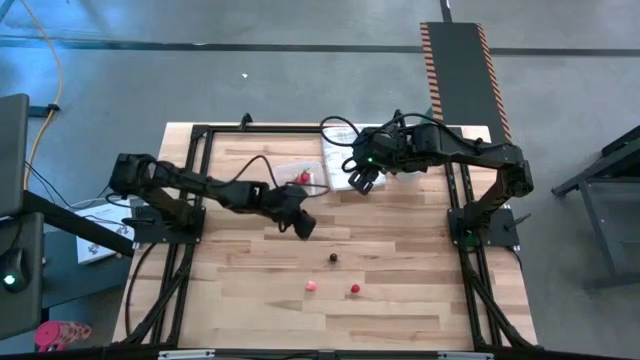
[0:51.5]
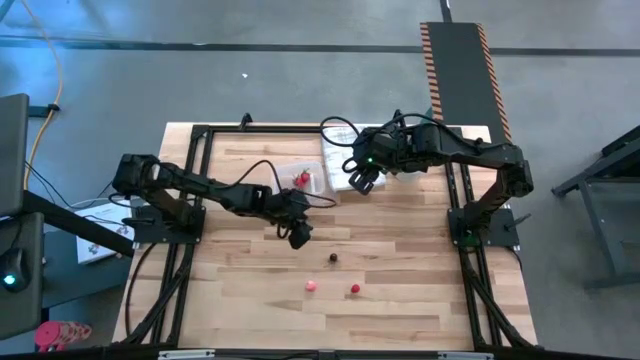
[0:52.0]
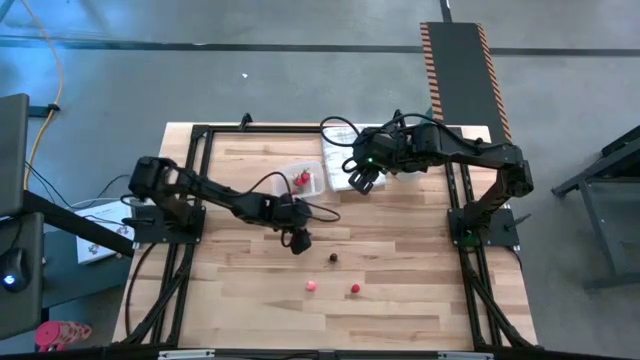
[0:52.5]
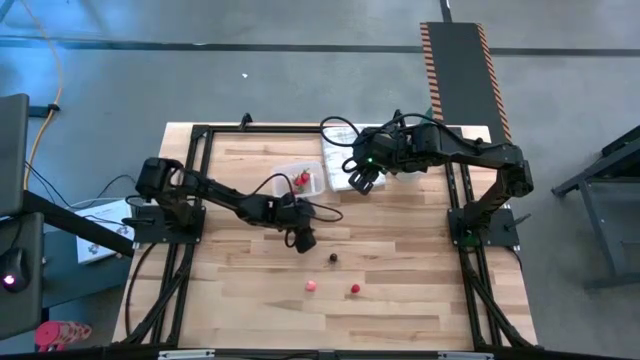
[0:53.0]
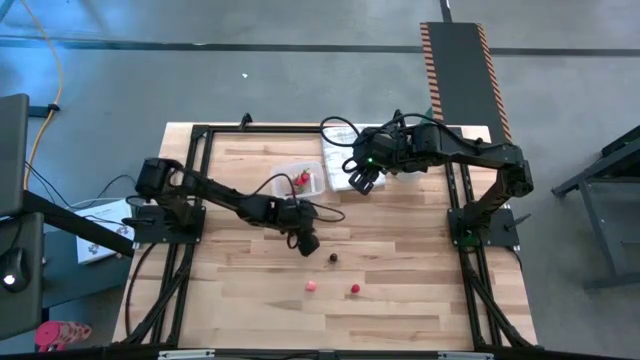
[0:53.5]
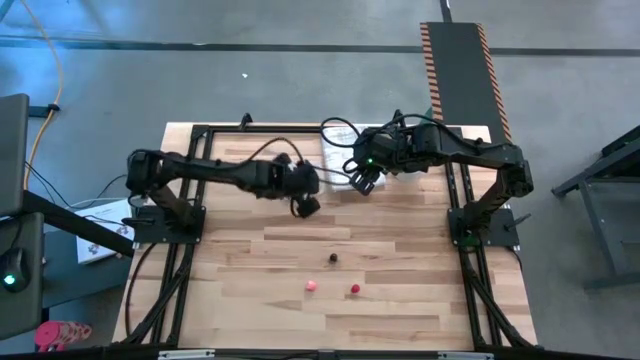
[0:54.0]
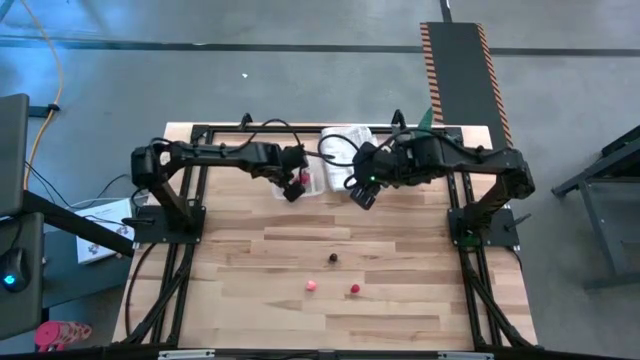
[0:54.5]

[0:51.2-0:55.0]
Task: Pick and placing Produce into tupperware
Put the red strawberry into the transparent bin

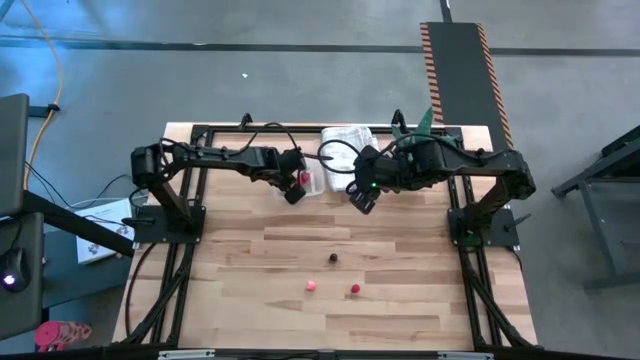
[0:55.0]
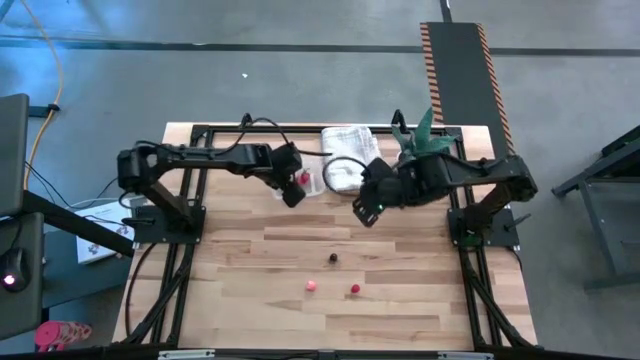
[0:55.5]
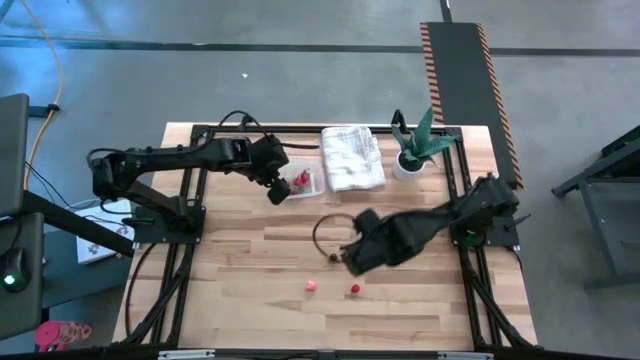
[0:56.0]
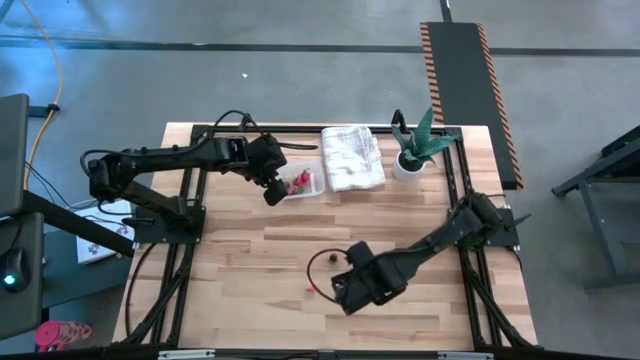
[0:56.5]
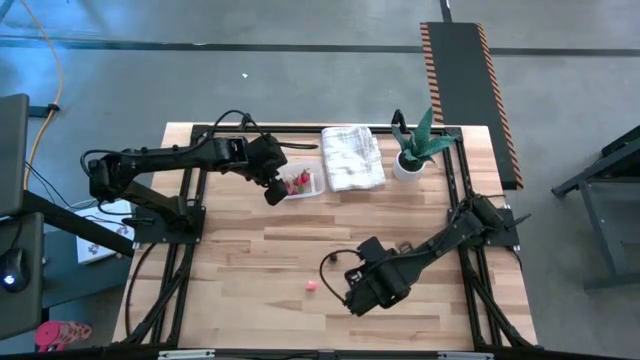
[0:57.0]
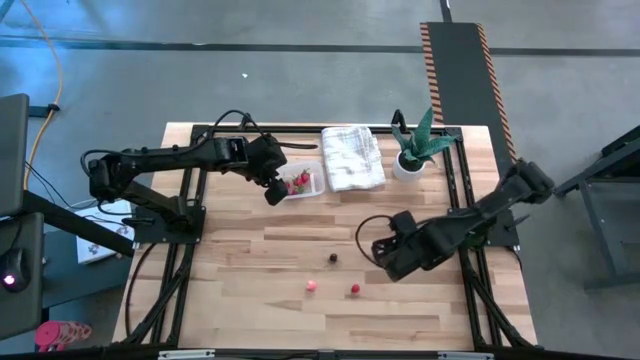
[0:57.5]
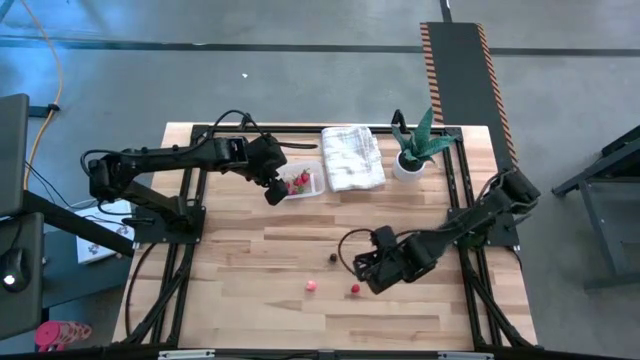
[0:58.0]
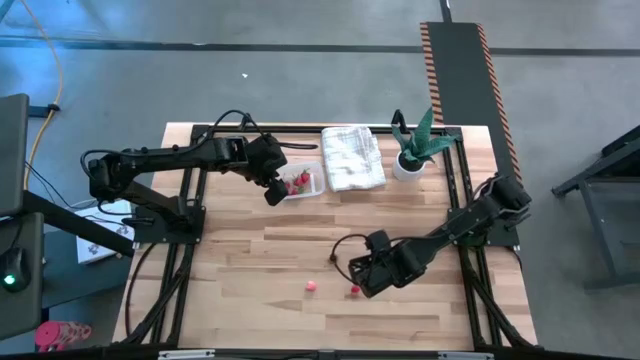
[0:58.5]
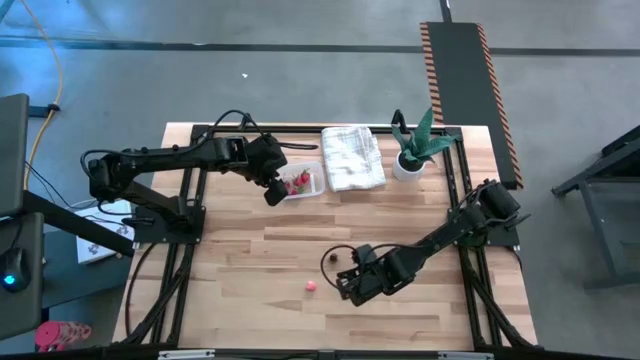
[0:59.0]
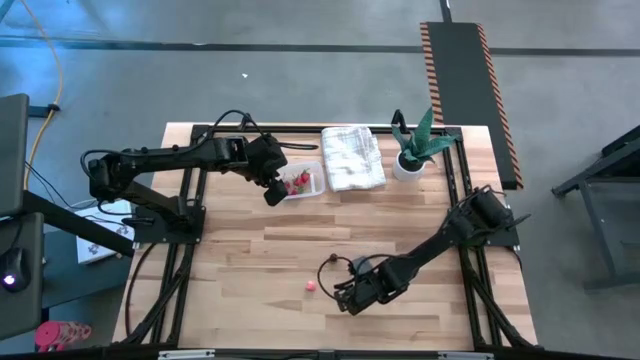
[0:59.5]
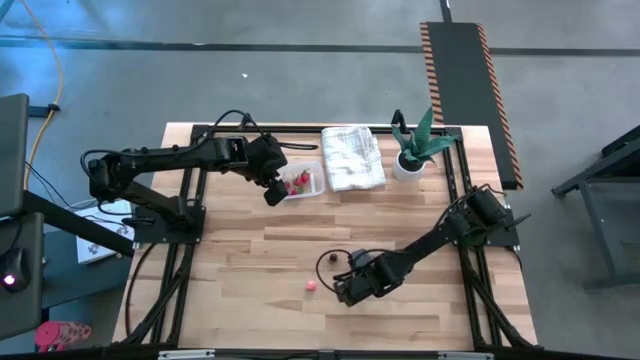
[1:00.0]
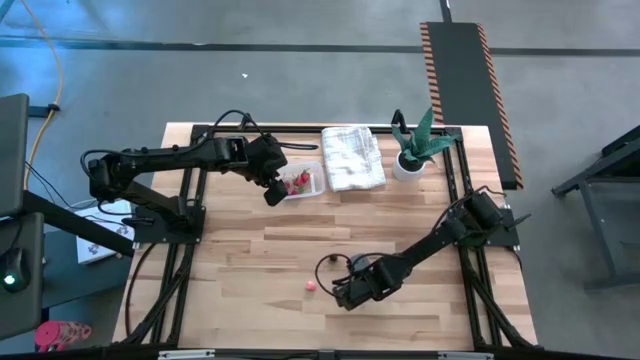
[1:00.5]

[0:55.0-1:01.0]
Put the red raspberry into the transparent bin

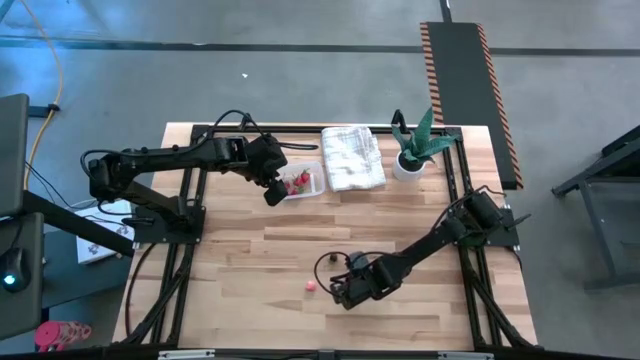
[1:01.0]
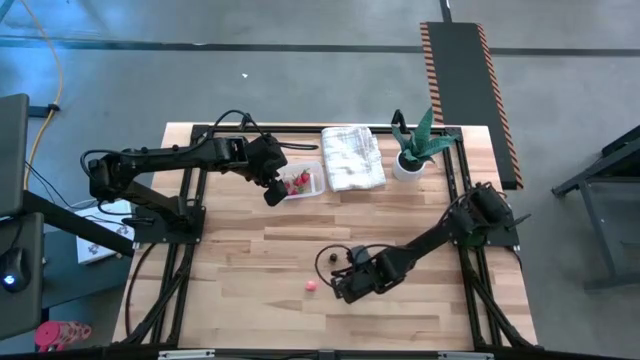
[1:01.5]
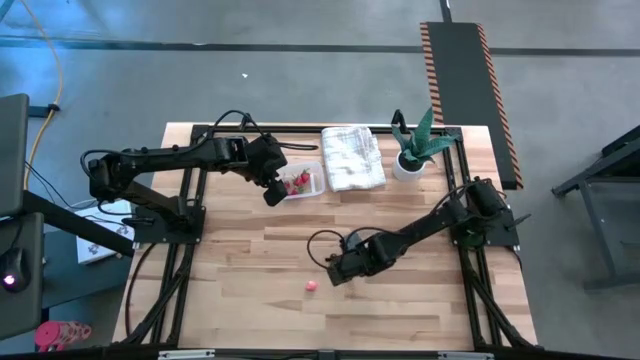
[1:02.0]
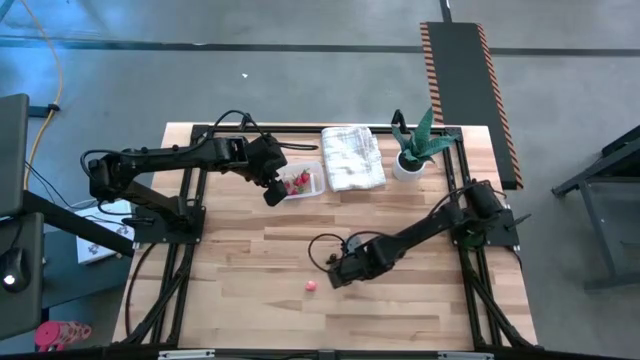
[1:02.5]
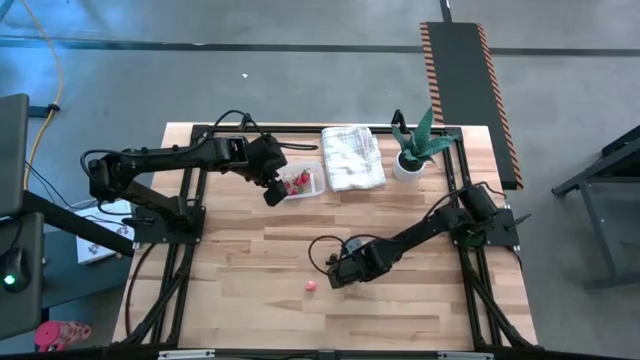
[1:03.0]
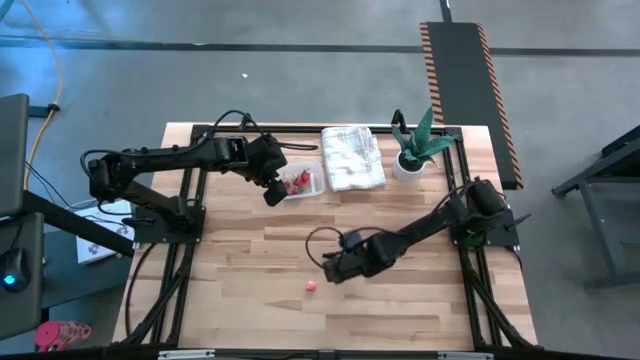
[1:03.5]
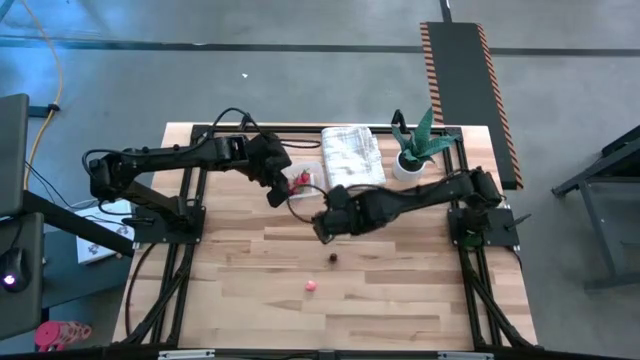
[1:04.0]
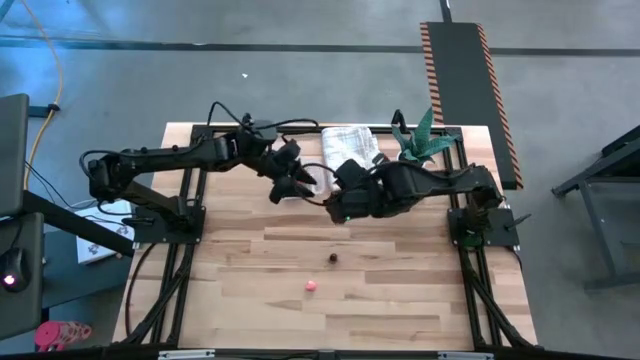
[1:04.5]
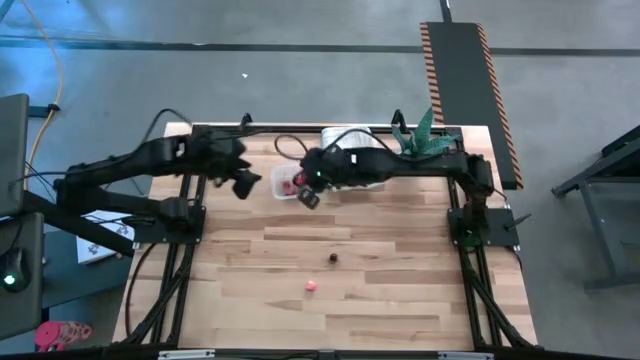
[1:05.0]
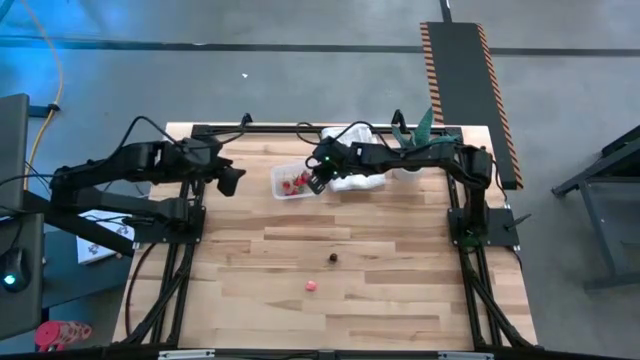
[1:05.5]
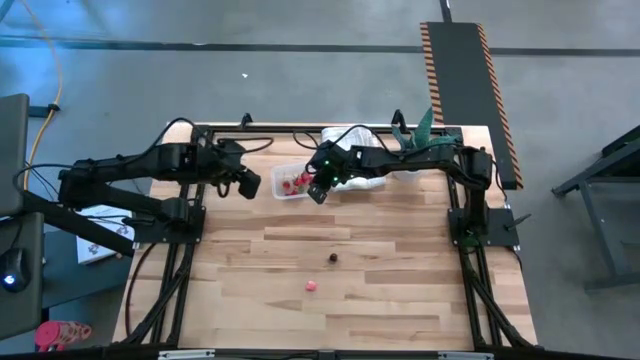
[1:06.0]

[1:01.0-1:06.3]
Put the red raspberry into the transparent bin

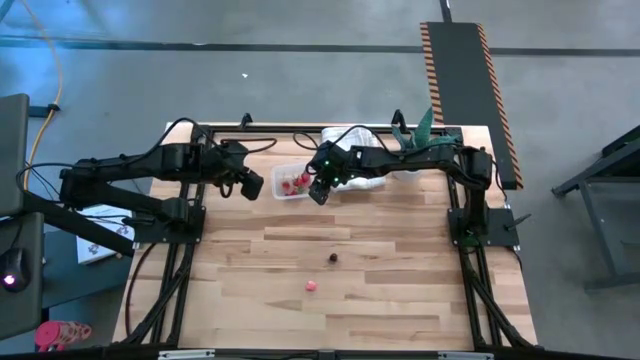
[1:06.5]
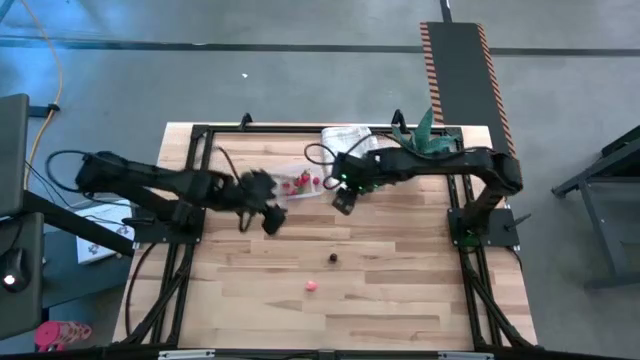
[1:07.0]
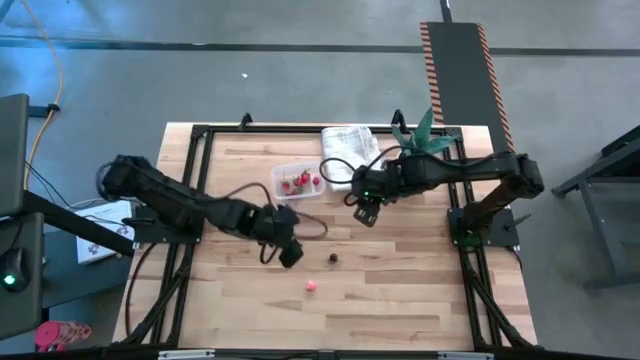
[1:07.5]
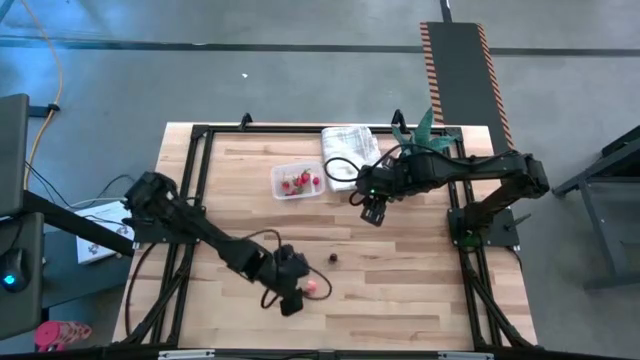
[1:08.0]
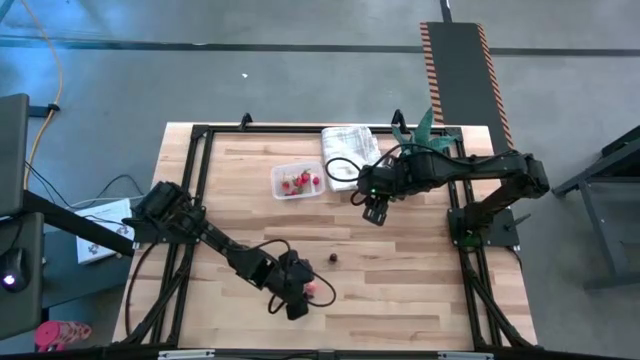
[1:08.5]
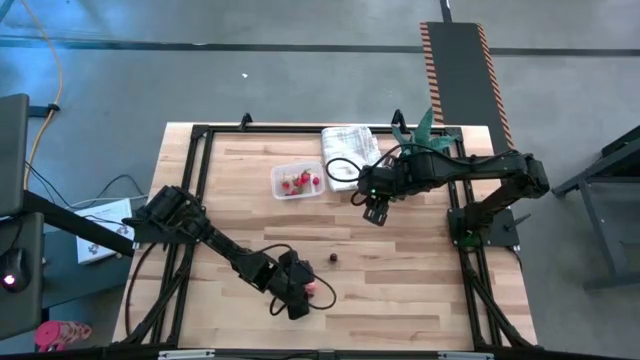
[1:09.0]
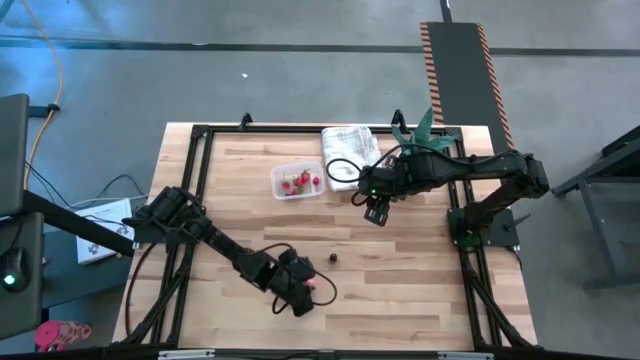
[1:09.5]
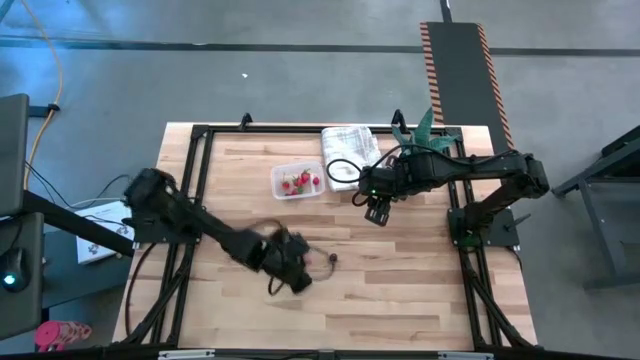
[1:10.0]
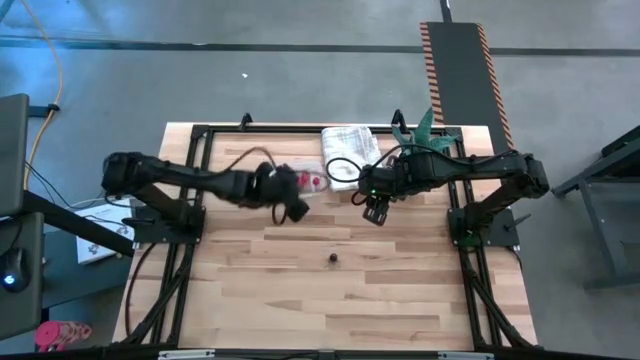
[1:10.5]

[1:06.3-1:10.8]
Put the pink peach into the transparent bin

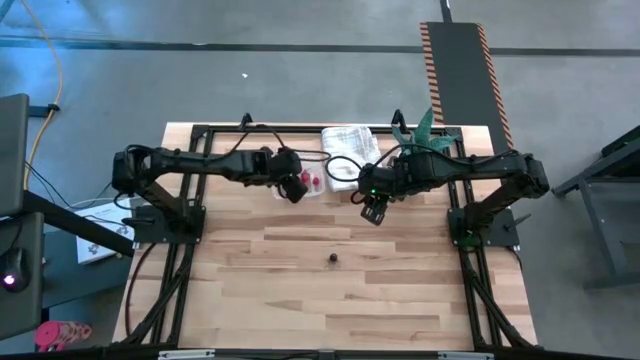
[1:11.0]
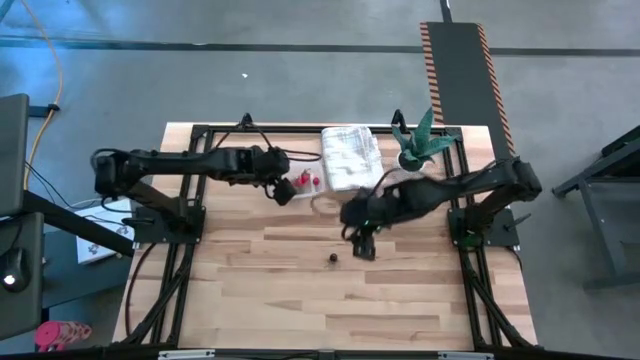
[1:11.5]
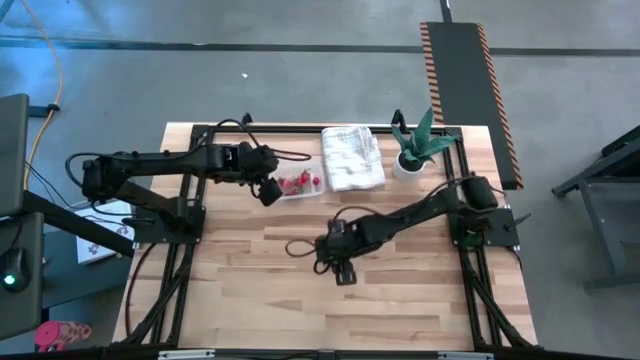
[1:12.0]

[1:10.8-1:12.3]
Put the black cherry into the transparent bin
